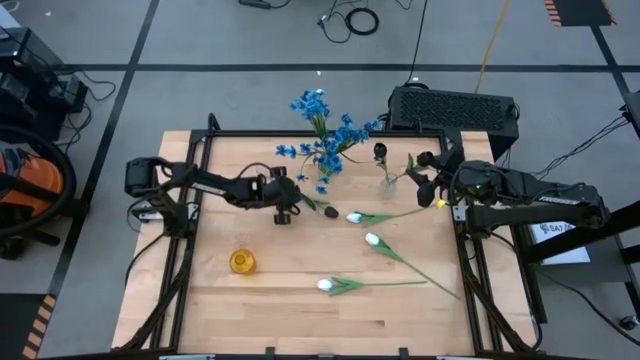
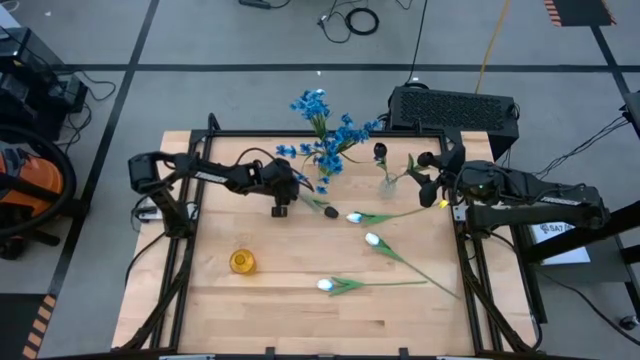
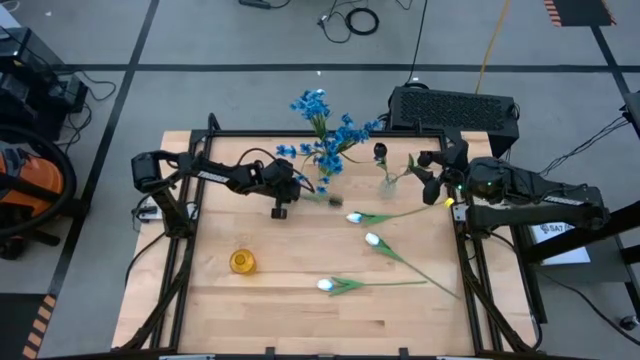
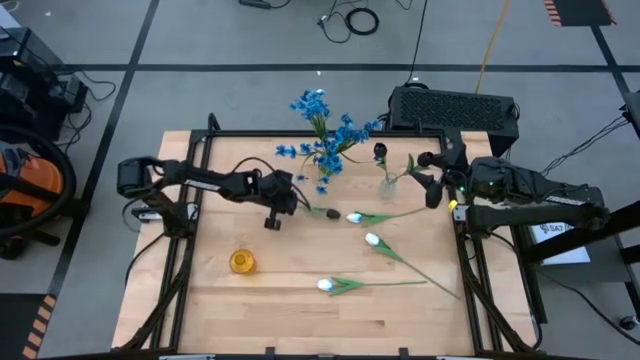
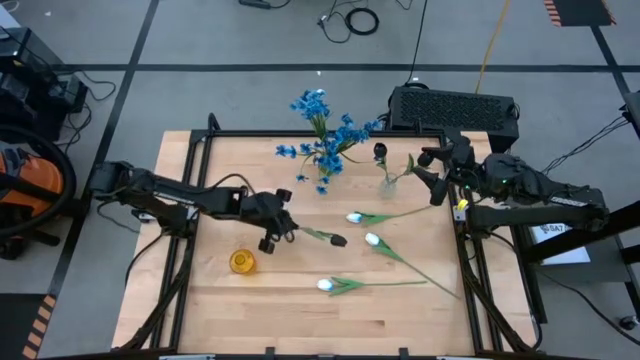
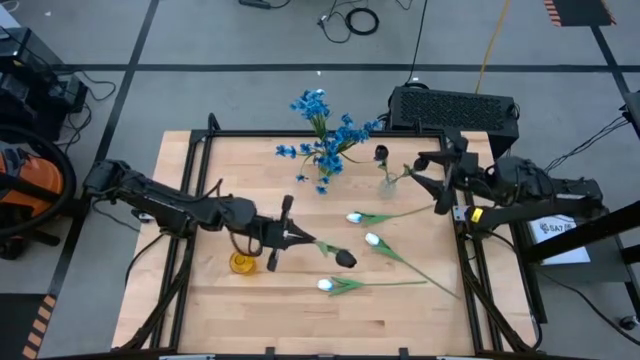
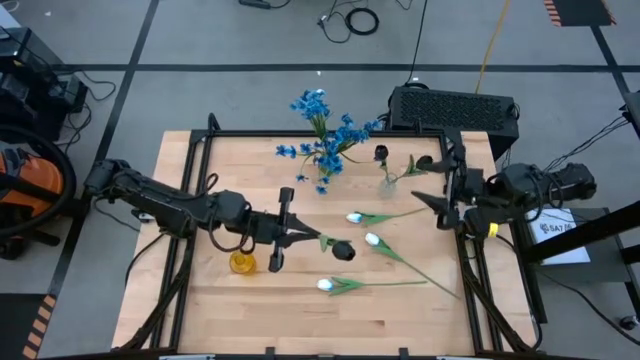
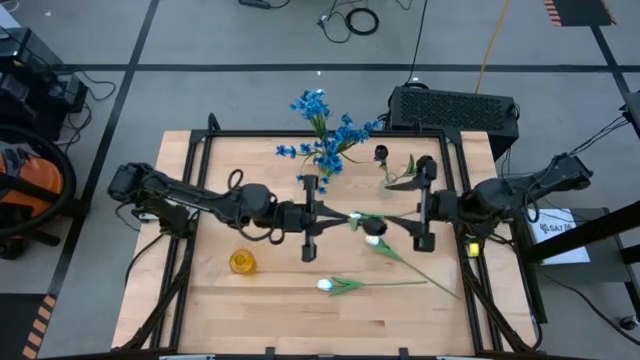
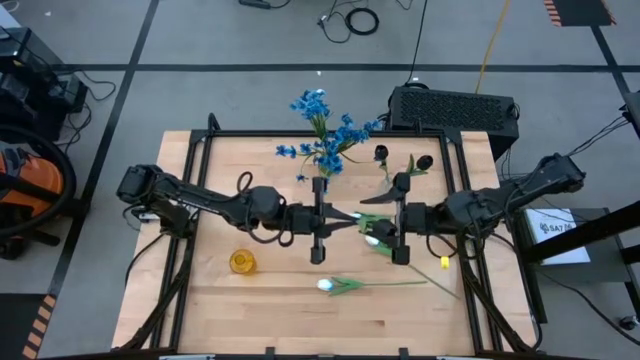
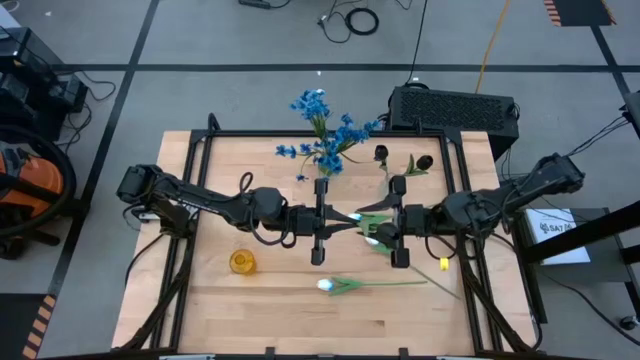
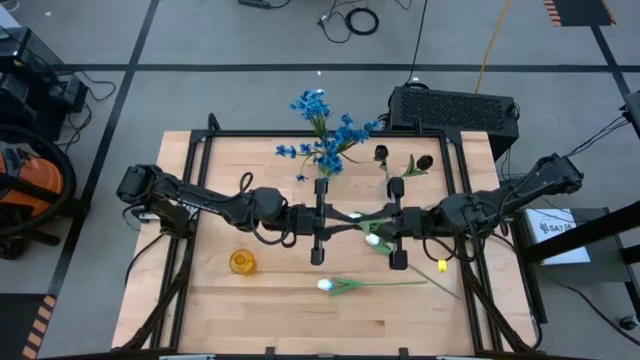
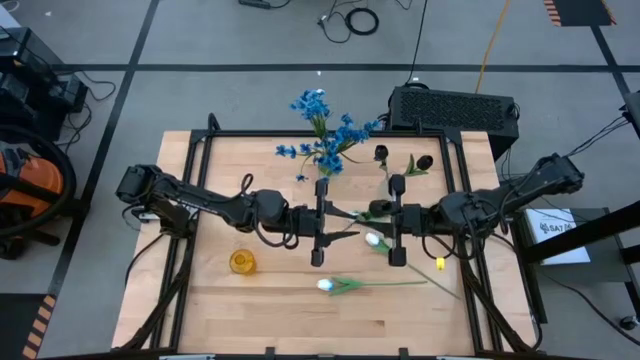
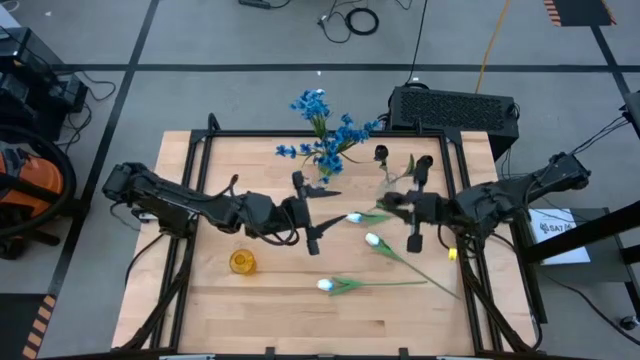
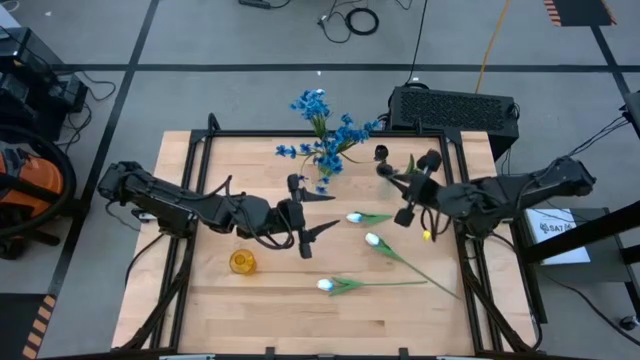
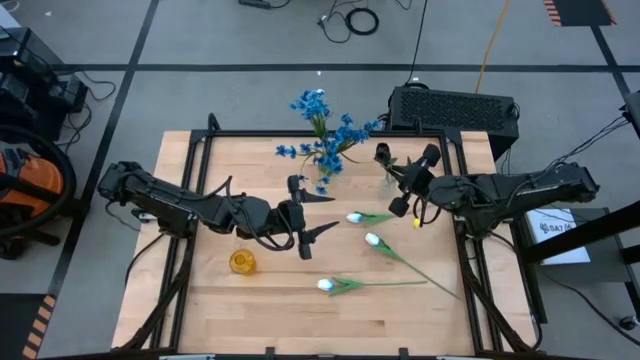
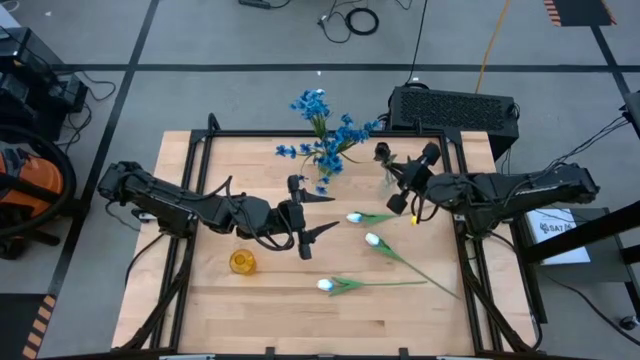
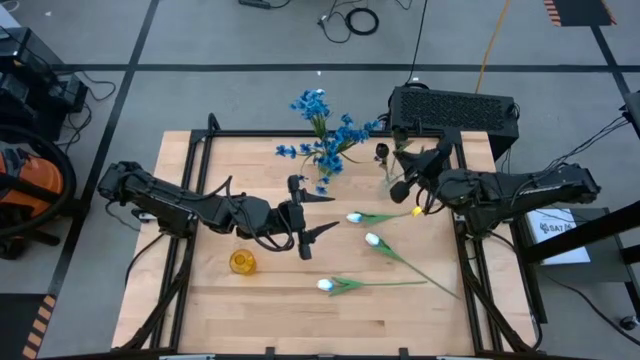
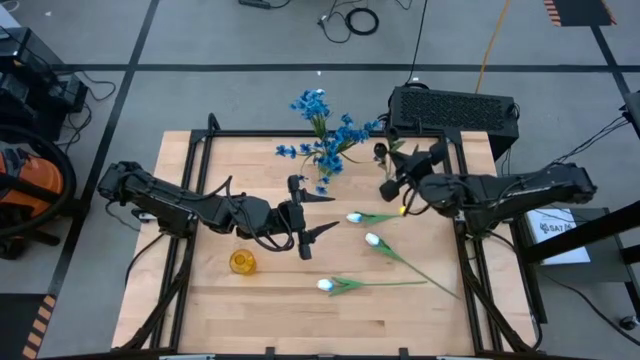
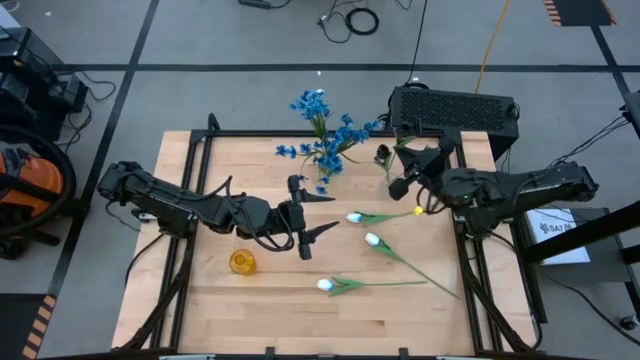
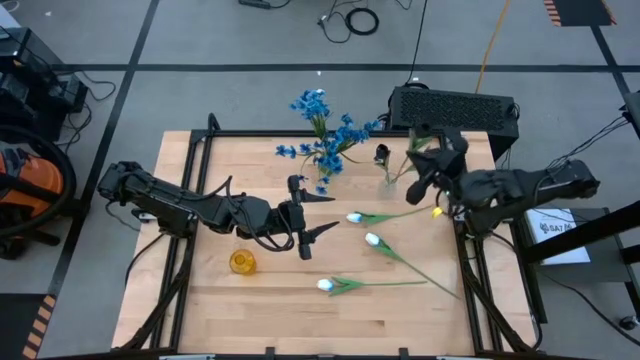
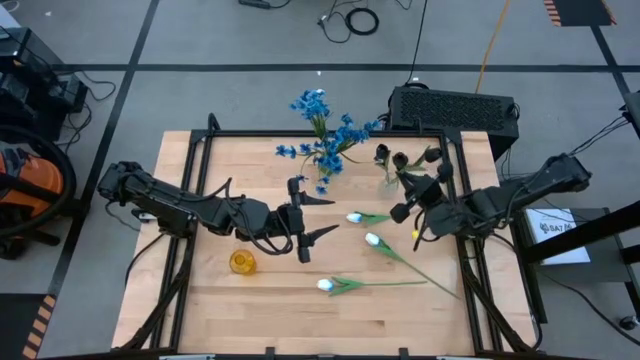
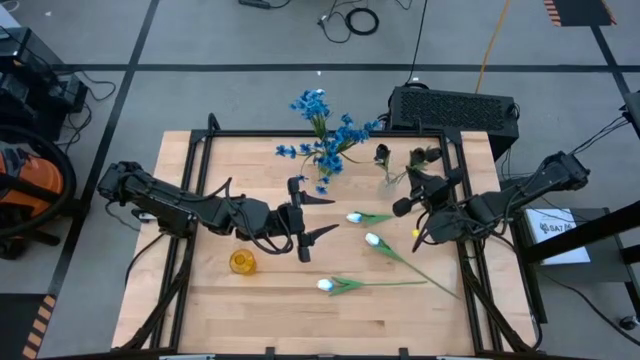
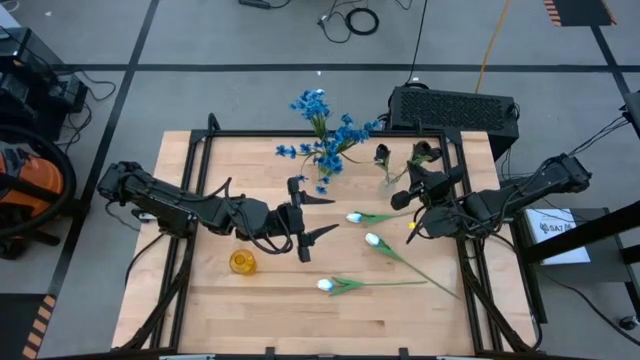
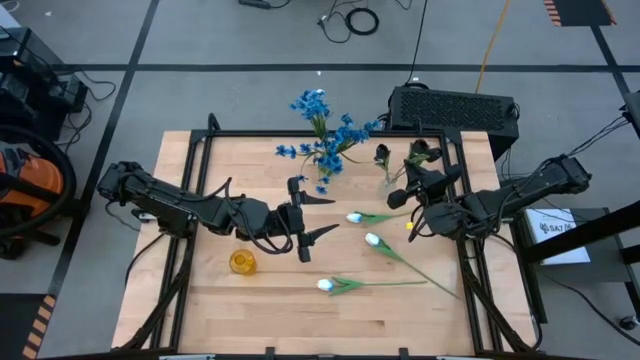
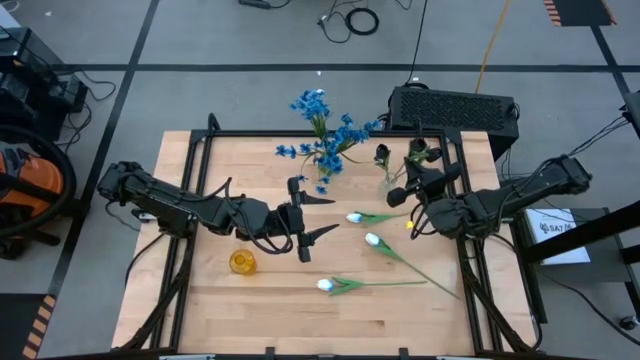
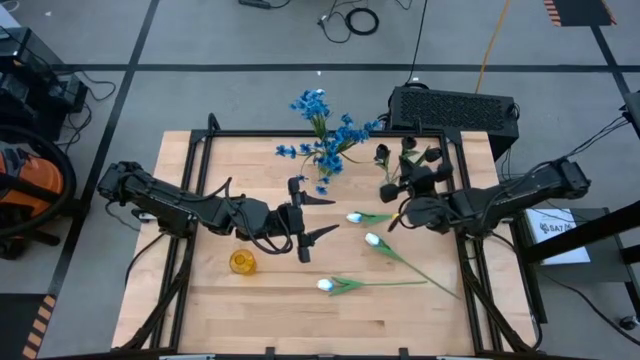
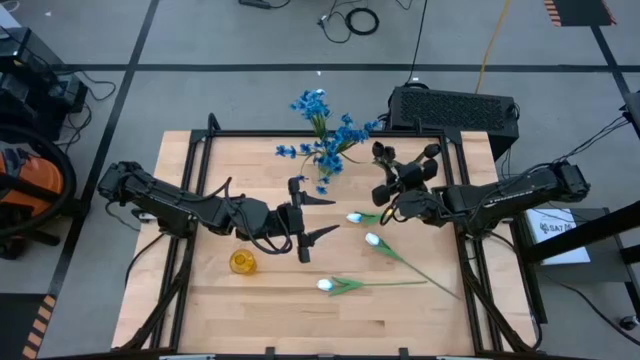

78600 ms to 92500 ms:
Task: Sort flowers into vase by color
Put the black tulip into the transparent vase

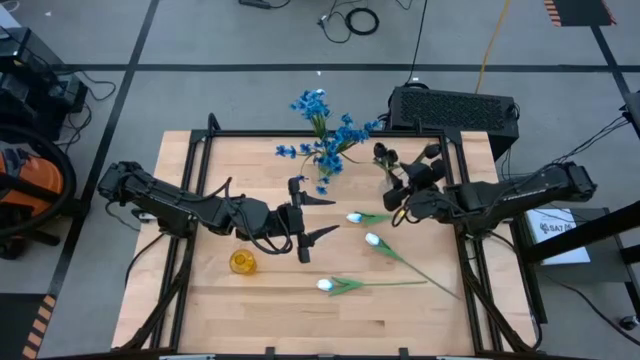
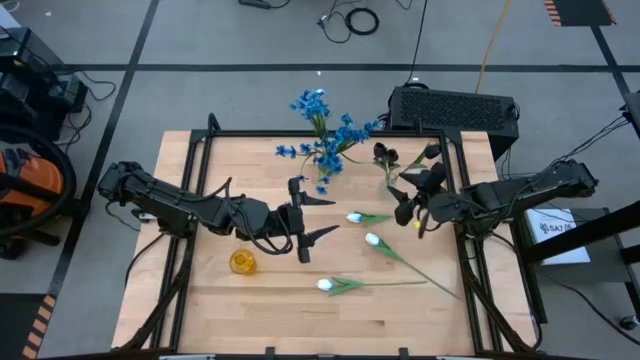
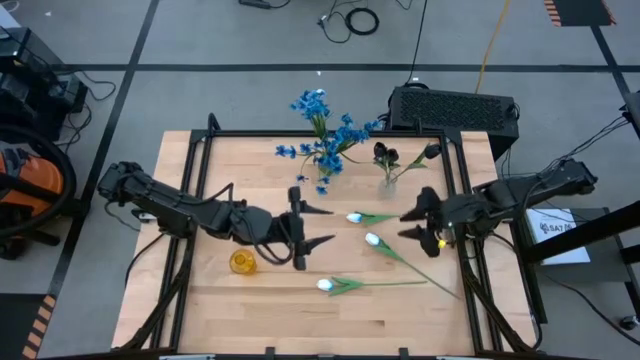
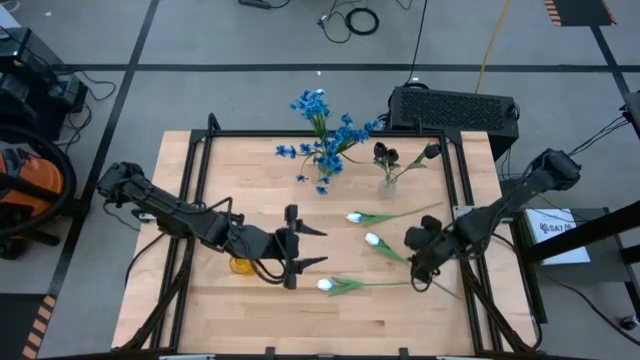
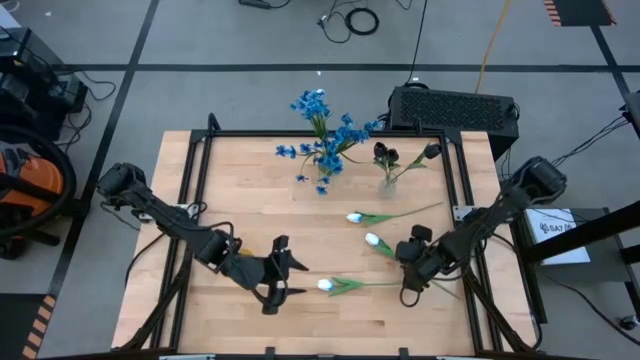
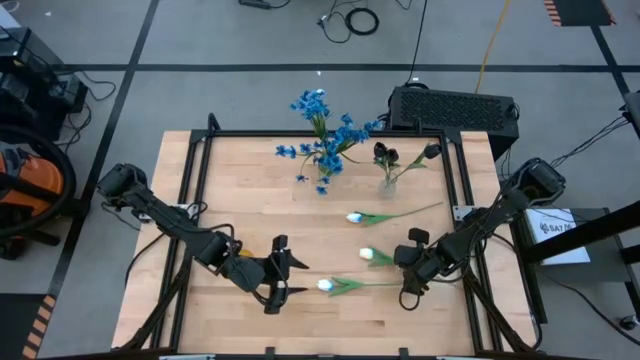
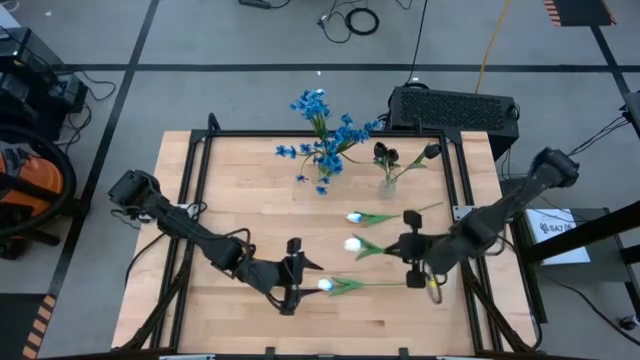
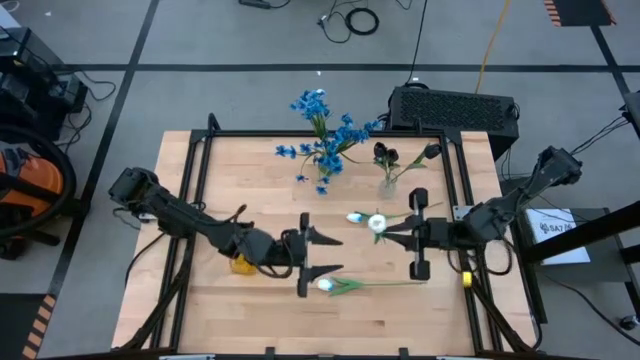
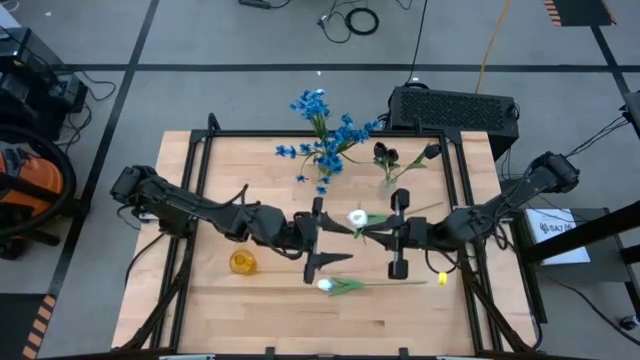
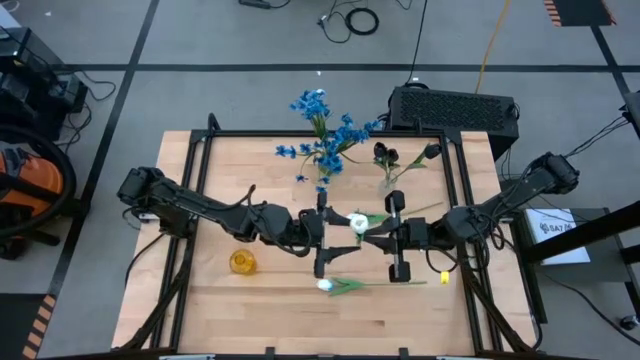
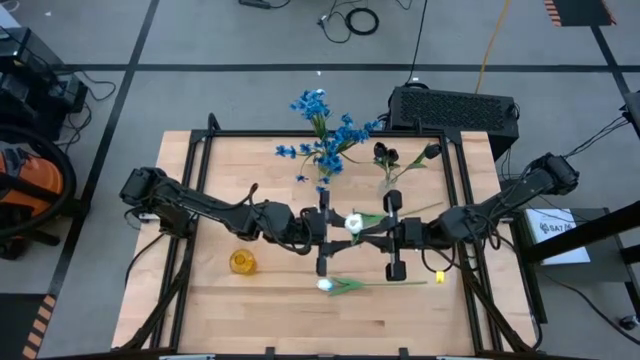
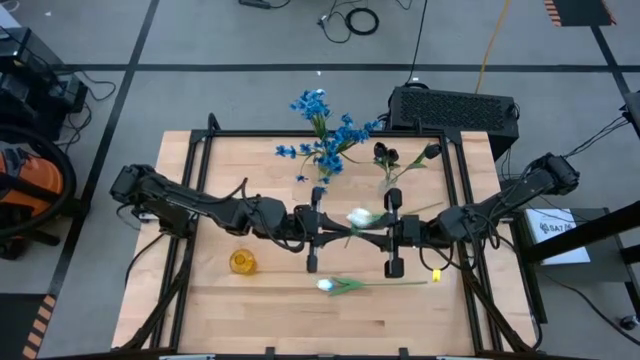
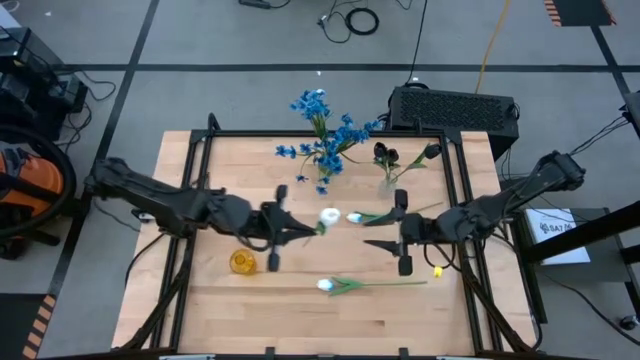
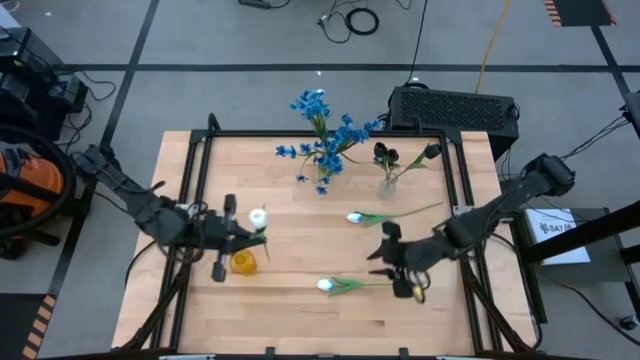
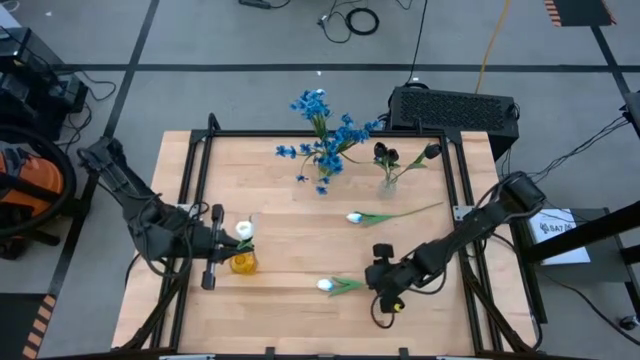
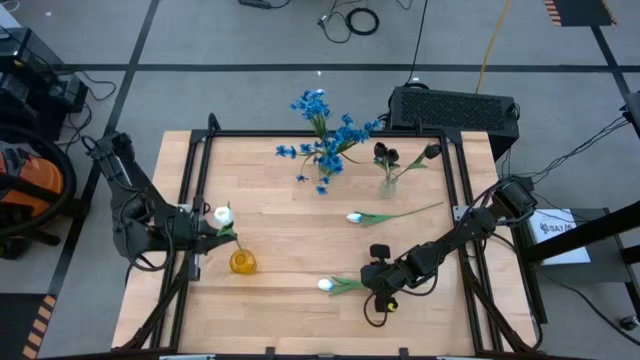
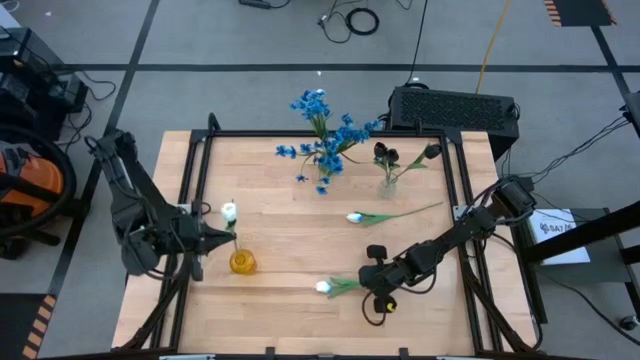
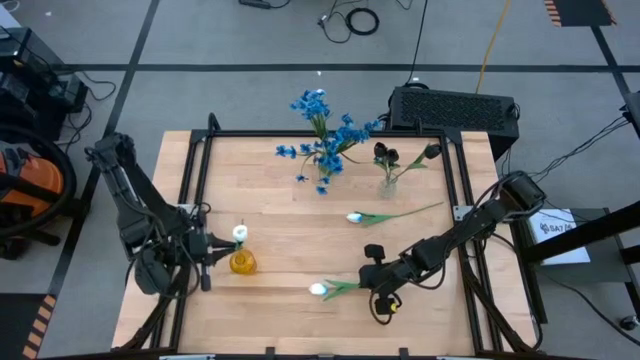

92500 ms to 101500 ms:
Put the middle white tulip into the yellow vase
